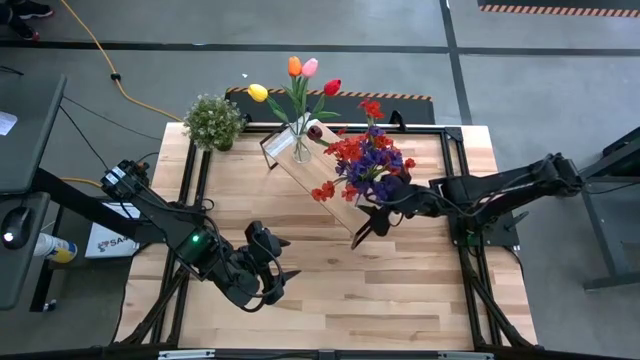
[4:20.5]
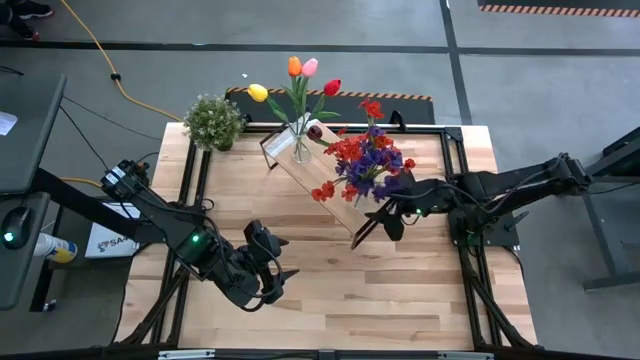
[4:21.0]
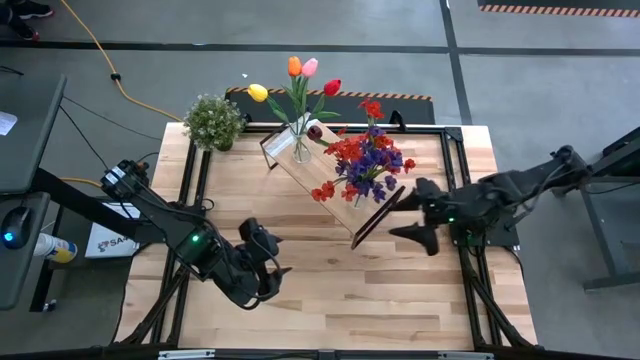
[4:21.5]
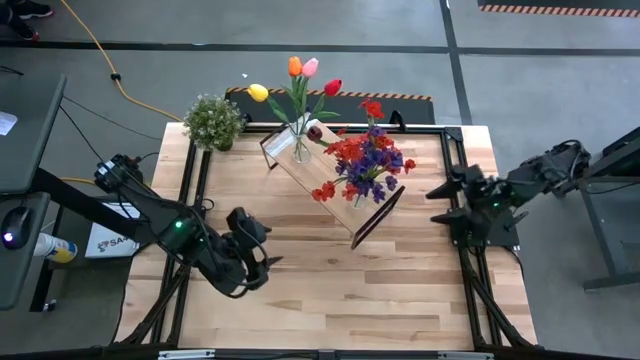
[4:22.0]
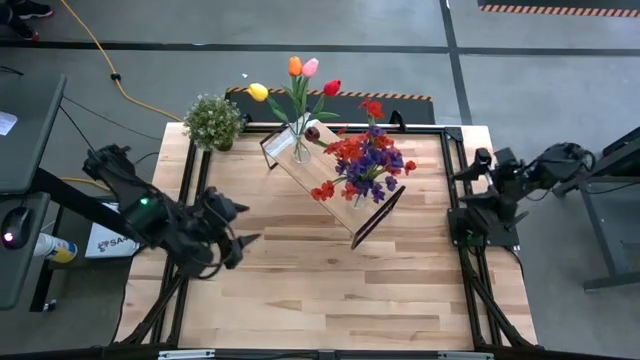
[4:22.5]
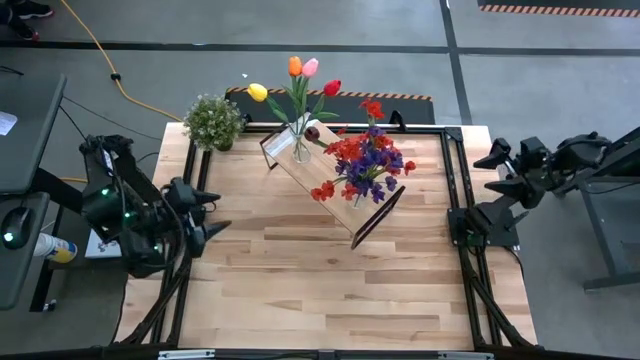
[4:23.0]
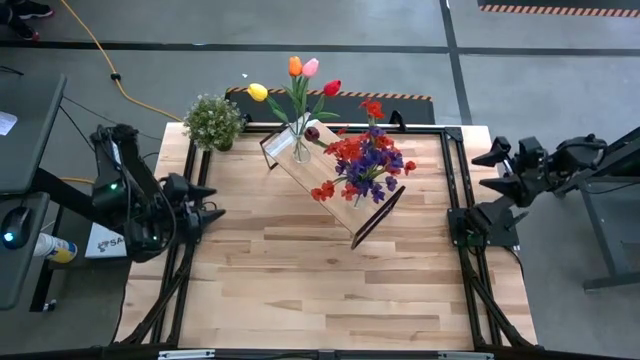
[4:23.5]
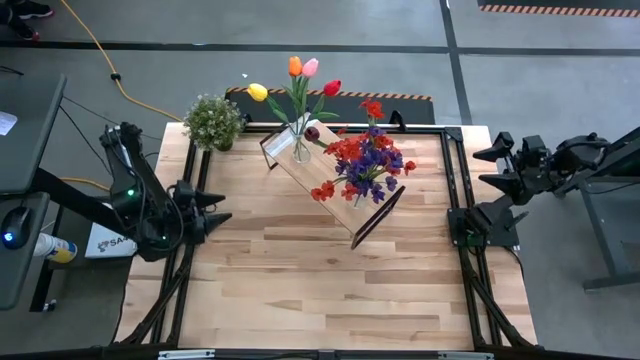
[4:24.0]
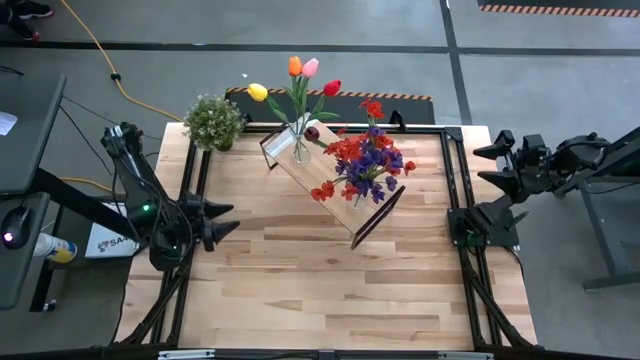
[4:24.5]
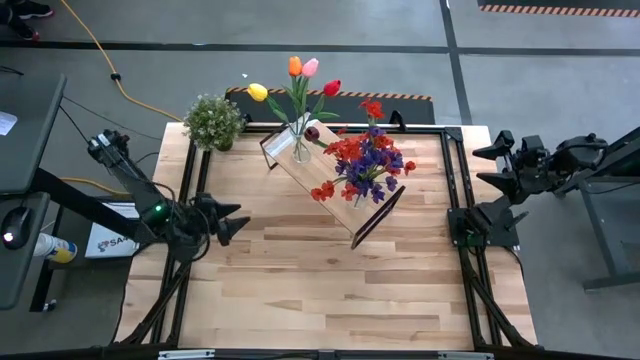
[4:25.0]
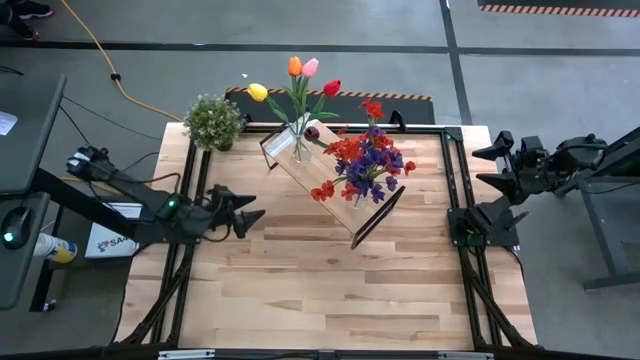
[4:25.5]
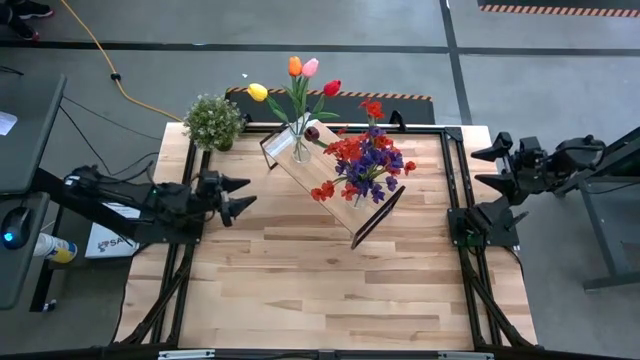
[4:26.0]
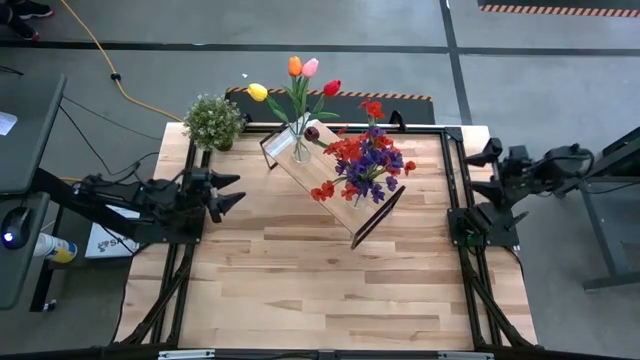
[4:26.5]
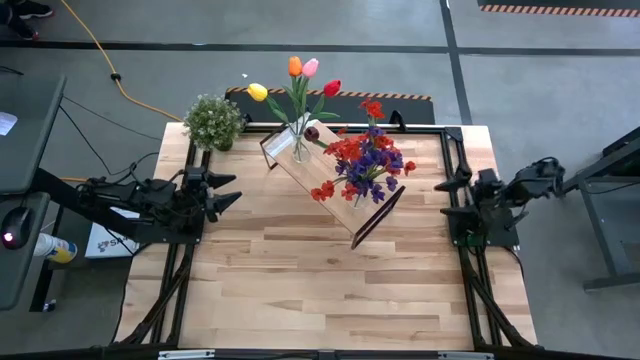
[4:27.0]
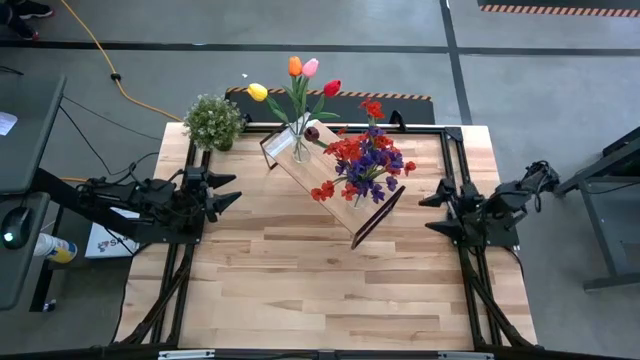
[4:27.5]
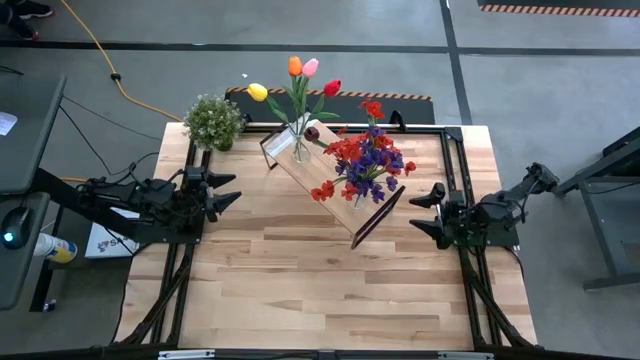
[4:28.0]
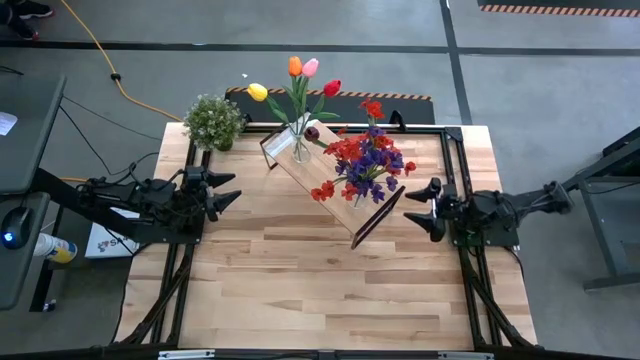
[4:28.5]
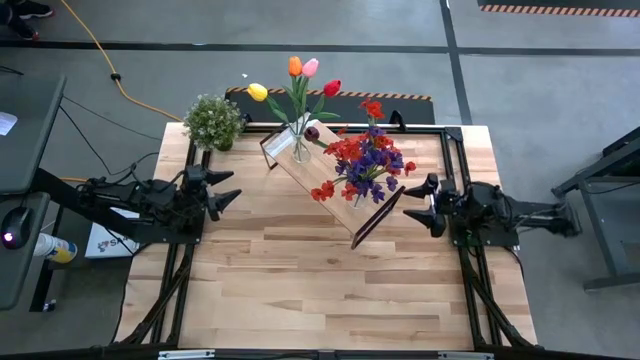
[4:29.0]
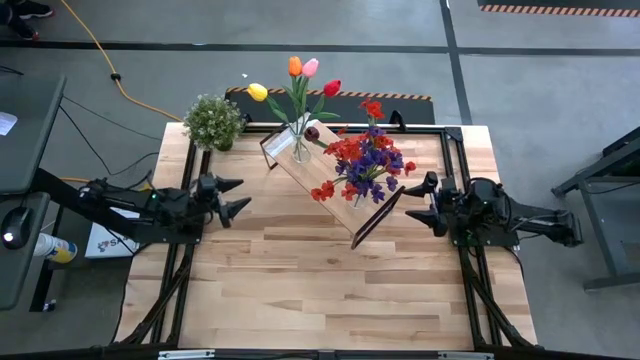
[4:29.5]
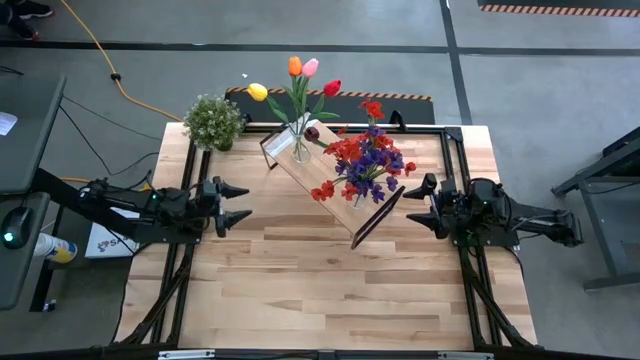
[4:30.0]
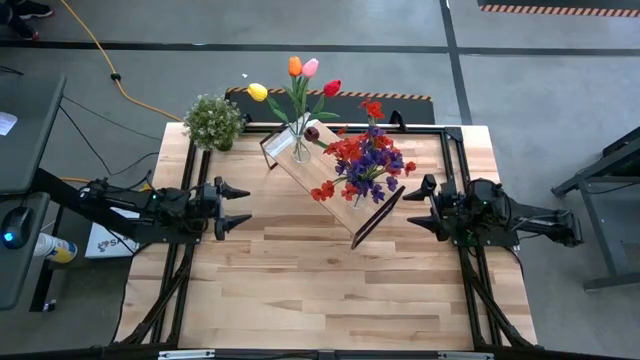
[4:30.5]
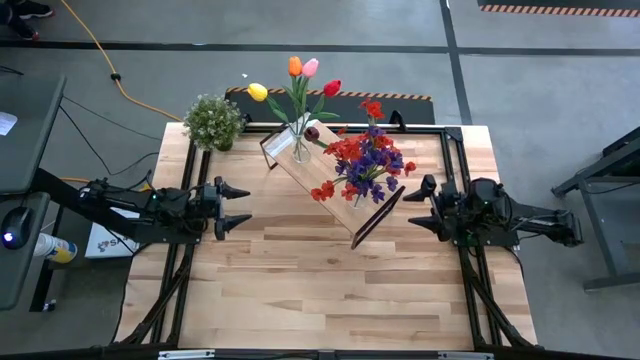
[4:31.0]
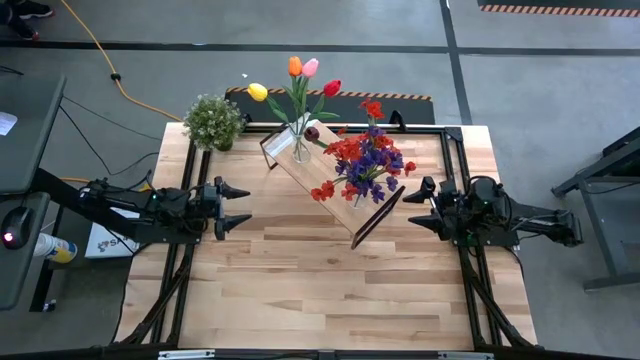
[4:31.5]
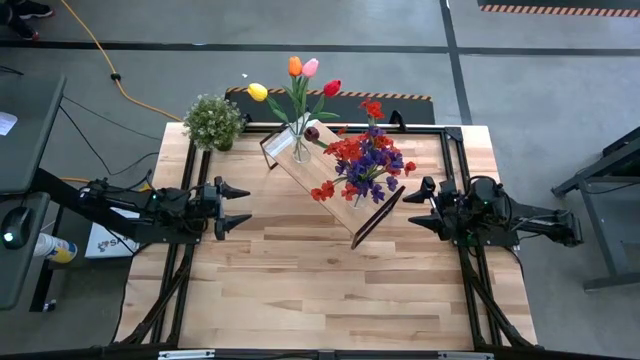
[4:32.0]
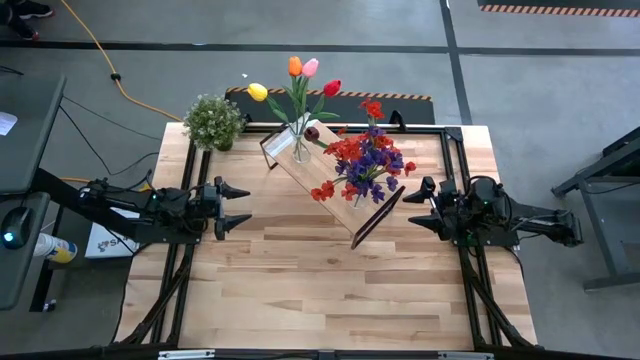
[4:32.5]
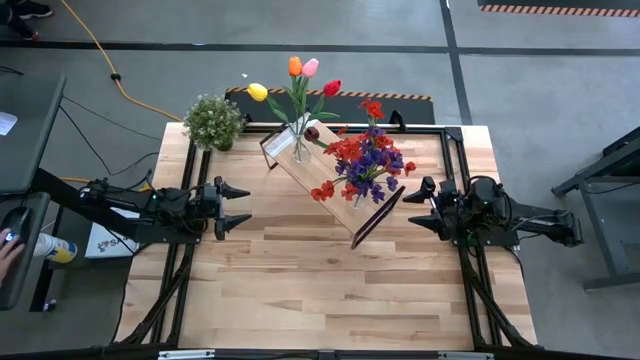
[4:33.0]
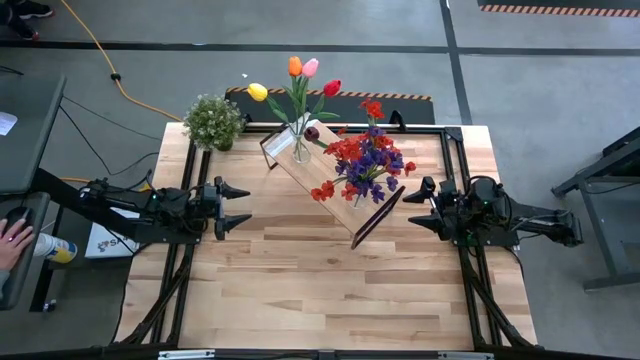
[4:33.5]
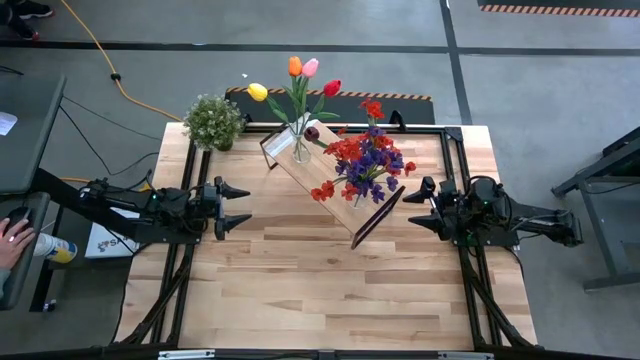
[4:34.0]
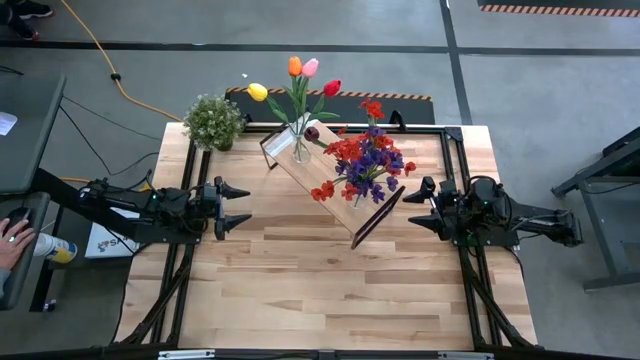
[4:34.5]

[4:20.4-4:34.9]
Task: Pick and place flowers into a vace then onto a shelf
Return to Home Position

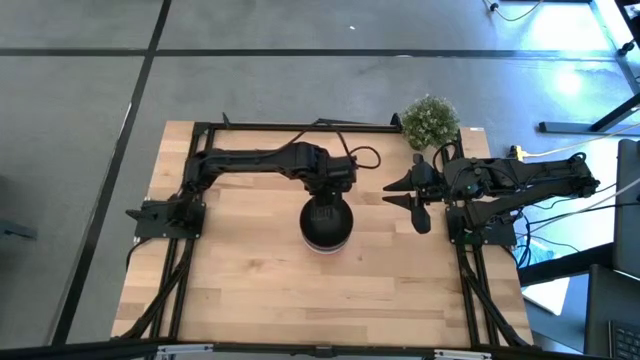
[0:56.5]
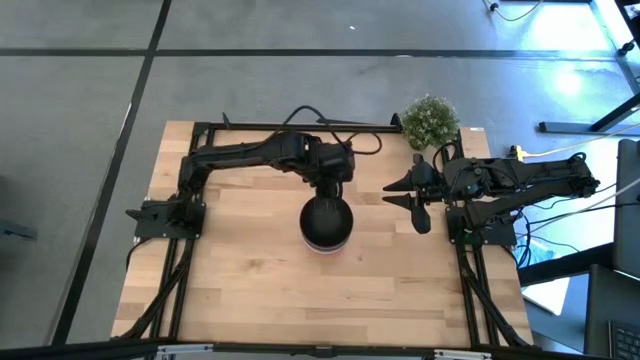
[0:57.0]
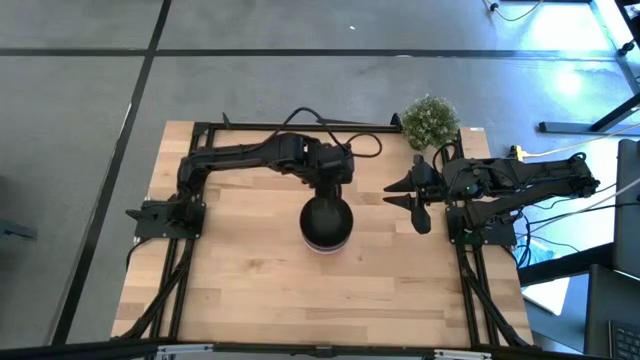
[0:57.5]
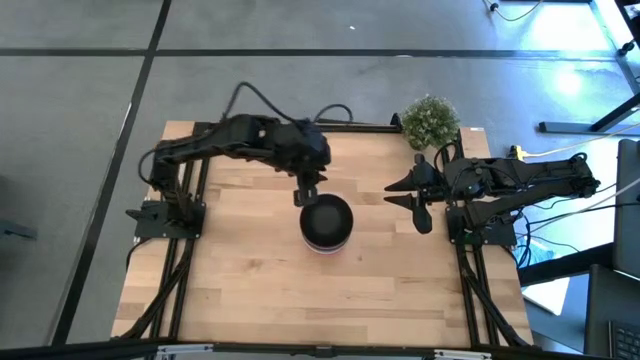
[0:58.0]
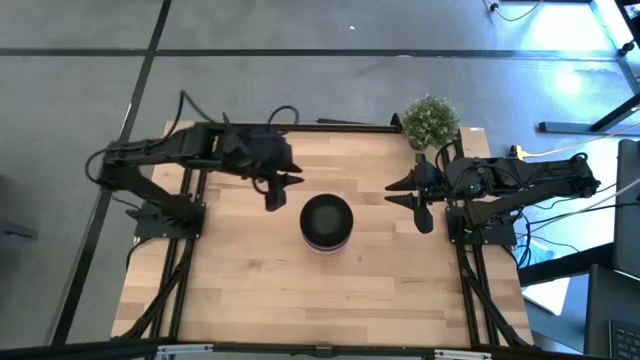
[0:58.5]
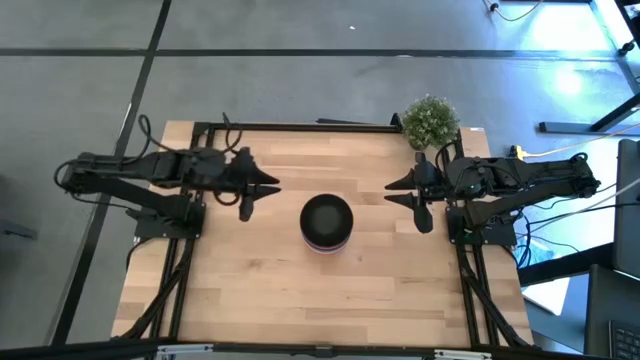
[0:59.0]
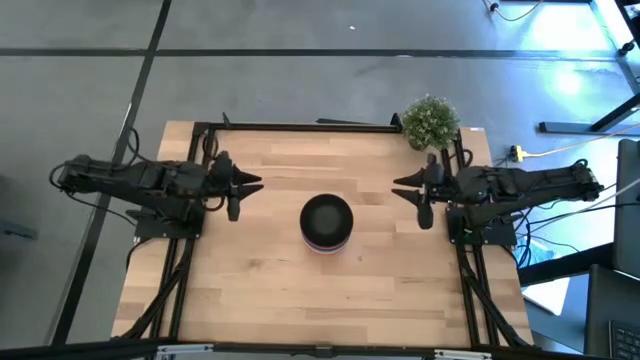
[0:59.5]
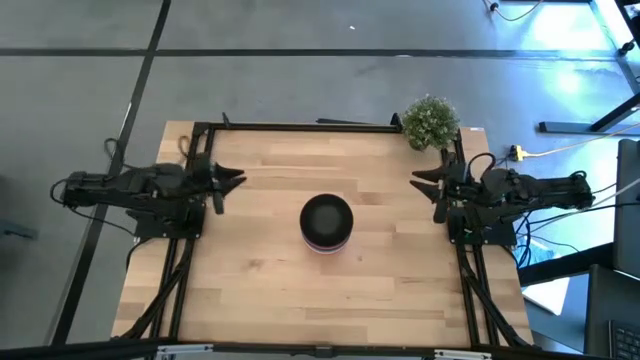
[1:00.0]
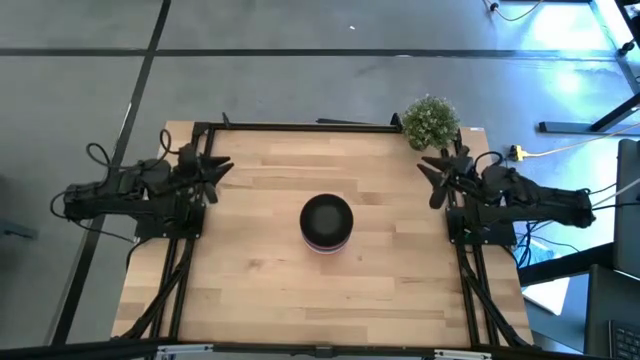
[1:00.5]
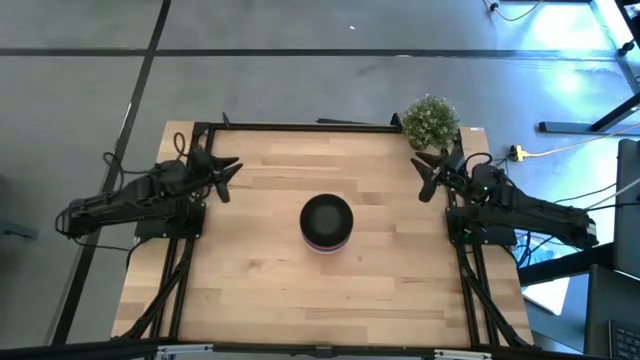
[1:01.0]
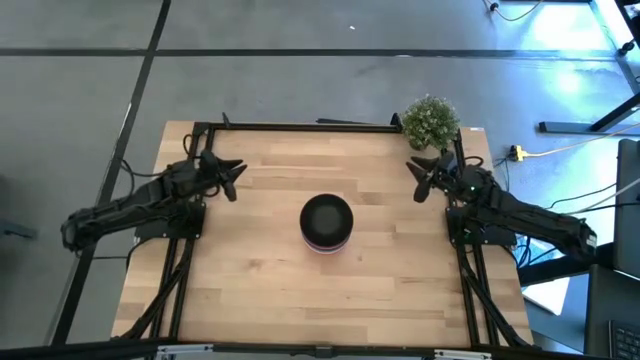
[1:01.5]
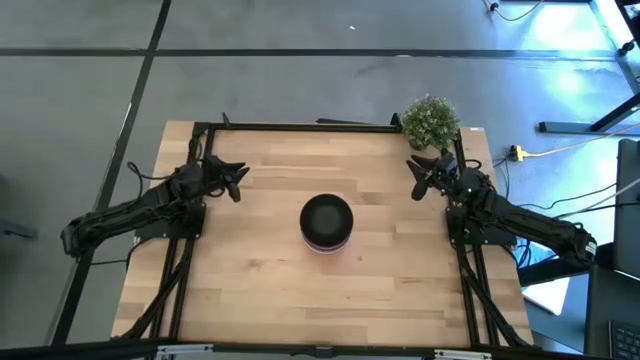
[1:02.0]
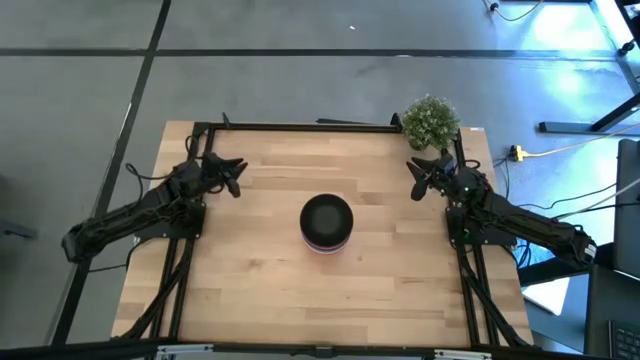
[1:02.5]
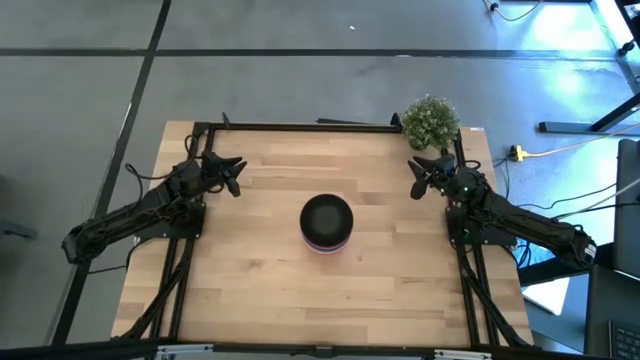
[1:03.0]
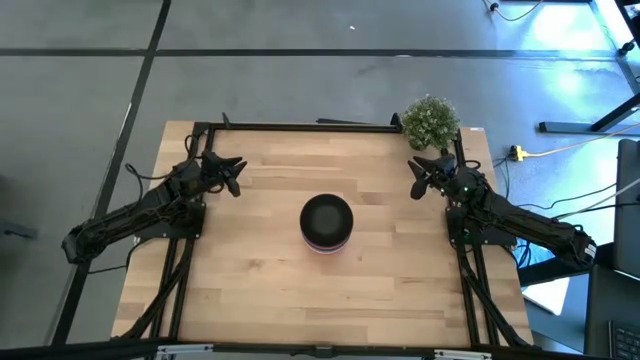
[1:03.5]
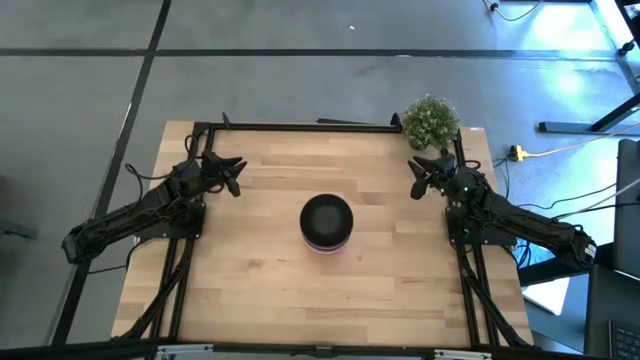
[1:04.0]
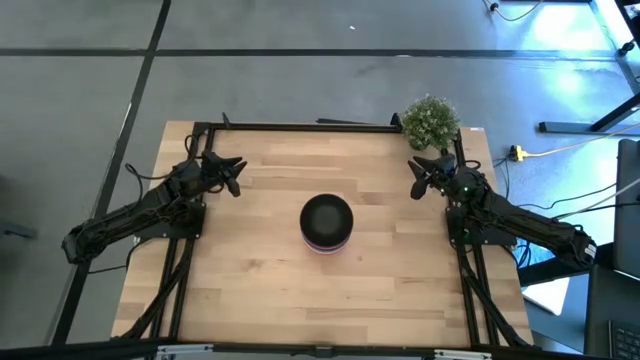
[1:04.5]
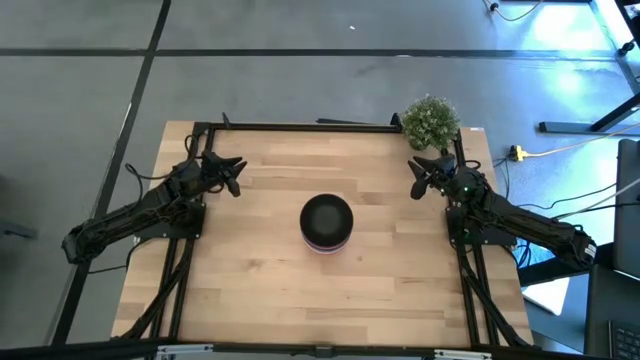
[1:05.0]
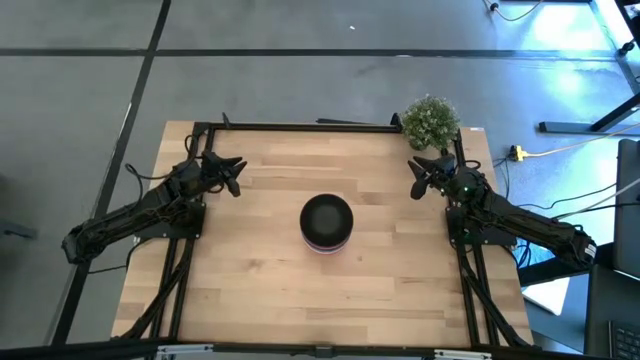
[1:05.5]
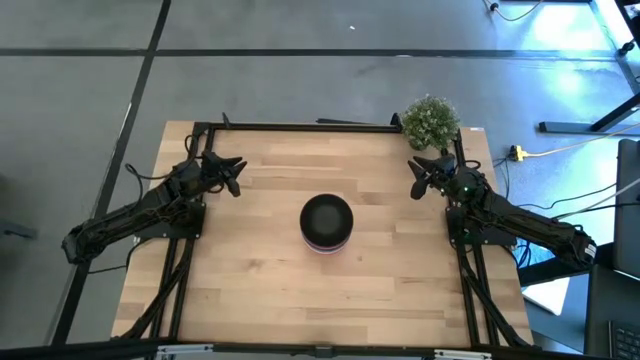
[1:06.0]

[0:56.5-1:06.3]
Task: Nest bowls inside each other
Return to Home Position
